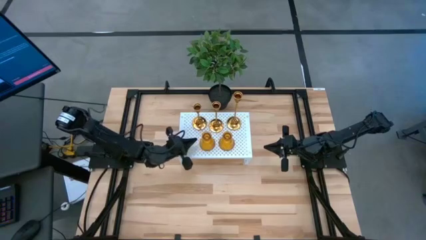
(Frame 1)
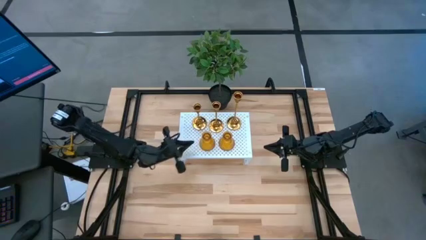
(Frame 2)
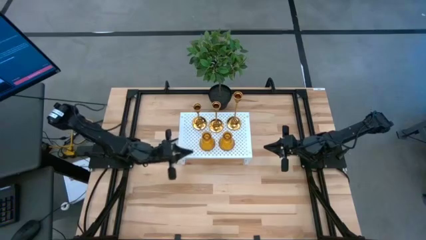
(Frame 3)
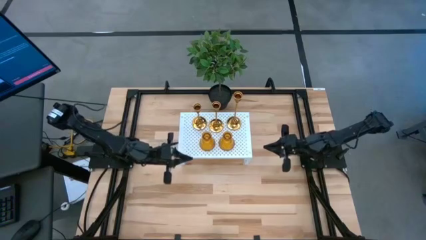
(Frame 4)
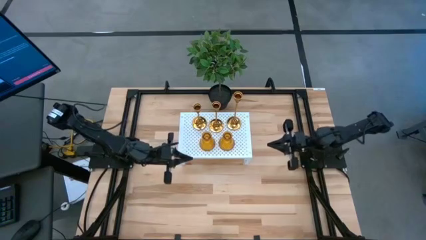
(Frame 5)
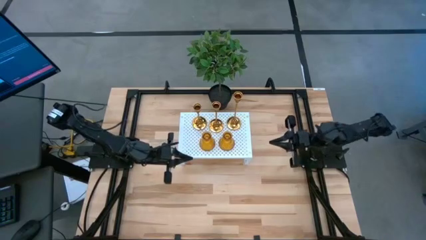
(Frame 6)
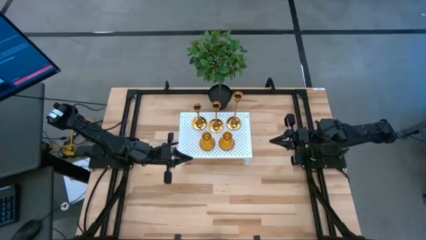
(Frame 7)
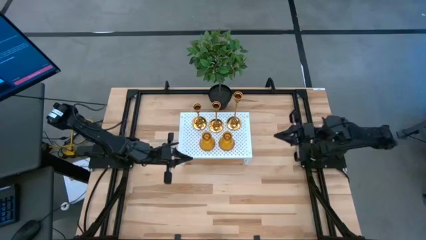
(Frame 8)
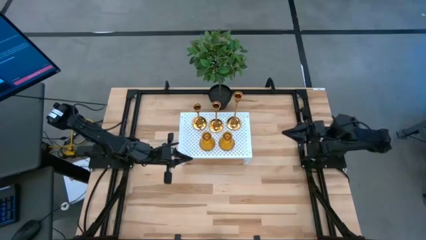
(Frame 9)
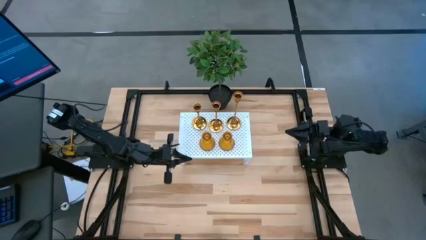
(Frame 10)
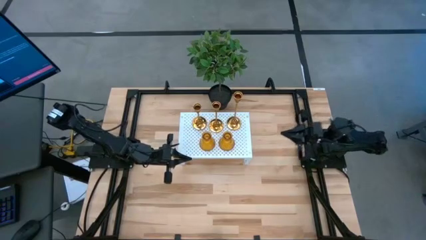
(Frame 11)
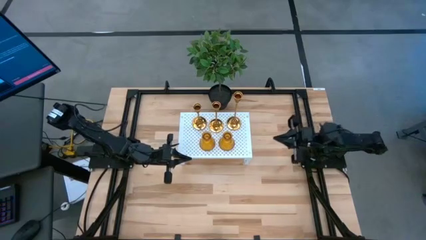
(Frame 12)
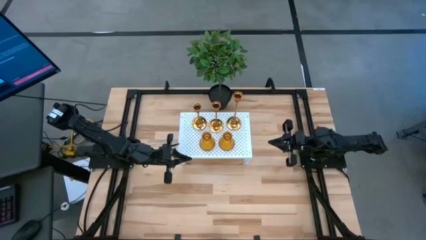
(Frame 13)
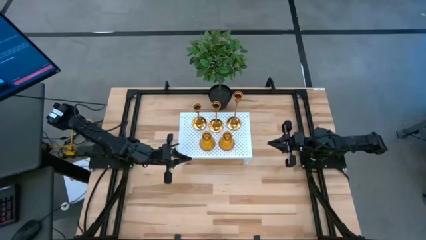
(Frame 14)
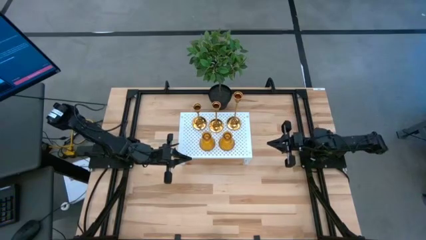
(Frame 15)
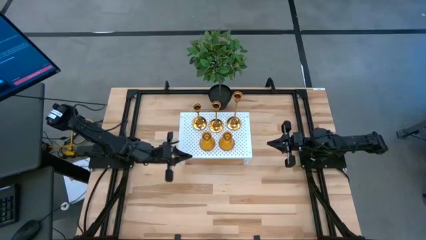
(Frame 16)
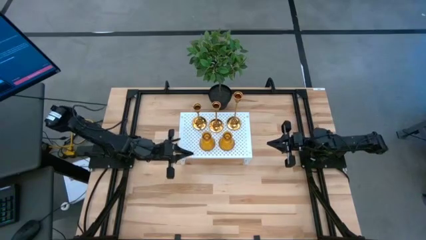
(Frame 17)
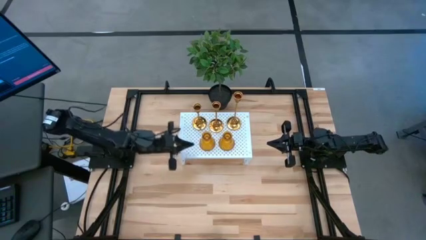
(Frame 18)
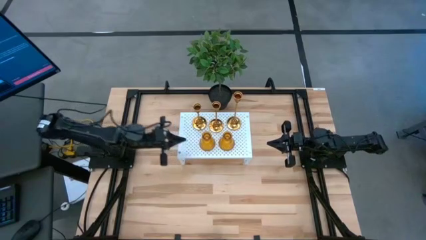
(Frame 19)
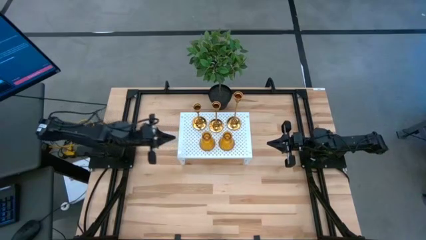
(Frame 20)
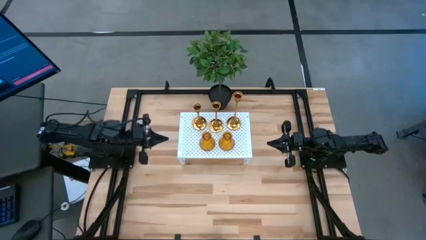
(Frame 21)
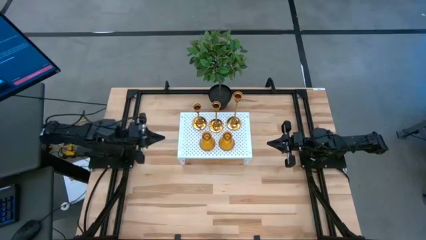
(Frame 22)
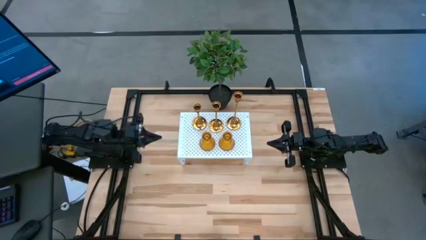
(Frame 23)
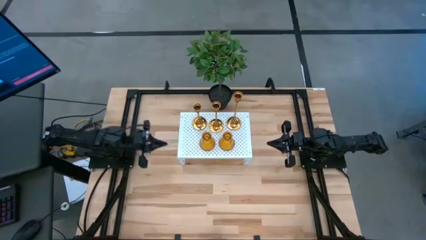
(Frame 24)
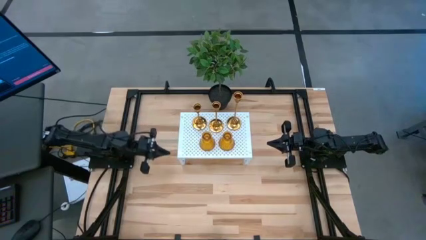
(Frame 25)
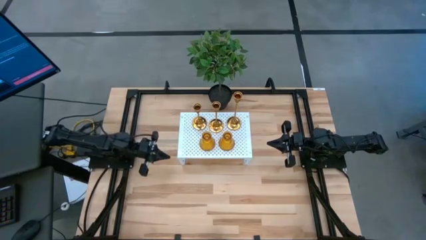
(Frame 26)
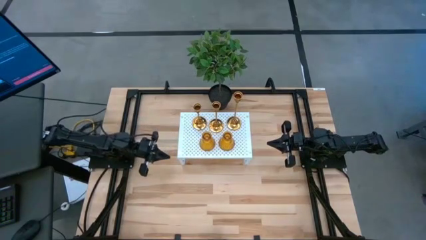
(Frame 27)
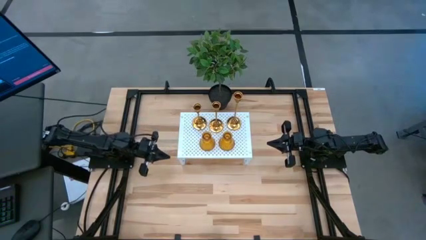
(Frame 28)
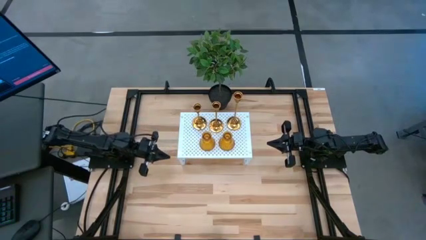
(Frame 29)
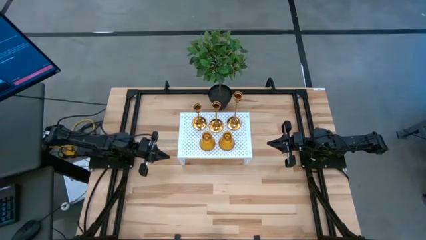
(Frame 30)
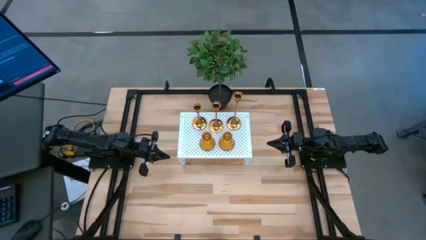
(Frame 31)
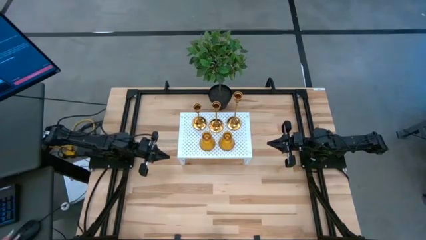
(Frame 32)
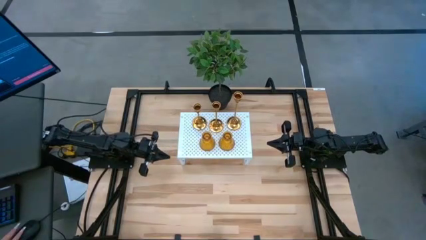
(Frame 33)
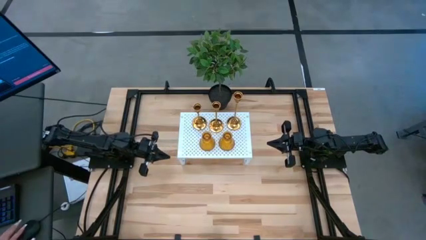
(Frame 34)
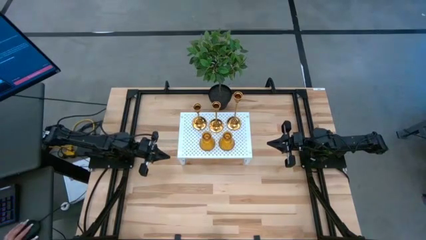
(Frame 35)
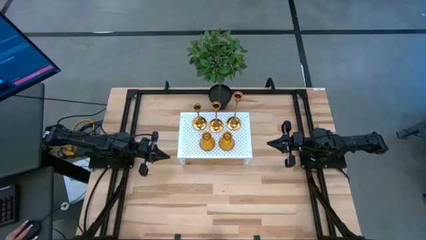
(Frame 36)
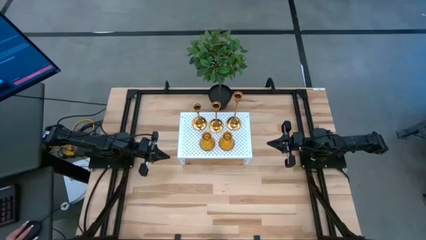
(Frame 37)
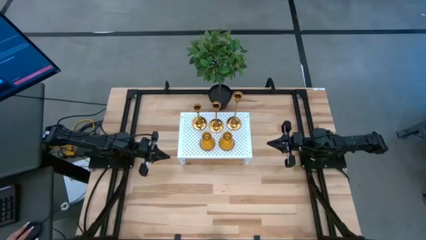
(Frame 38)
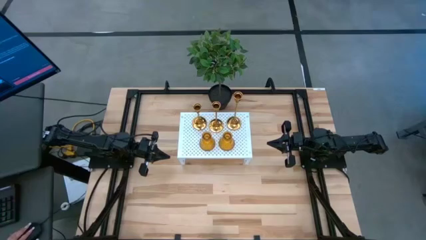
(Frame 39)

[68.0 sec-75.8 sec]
Task: Pick & Place candle stick holders
Return to Home Position

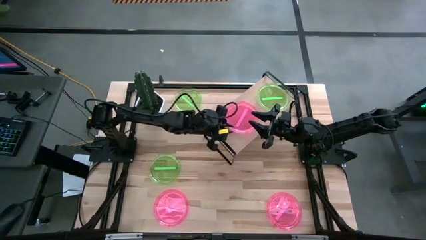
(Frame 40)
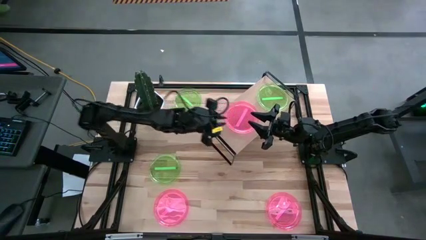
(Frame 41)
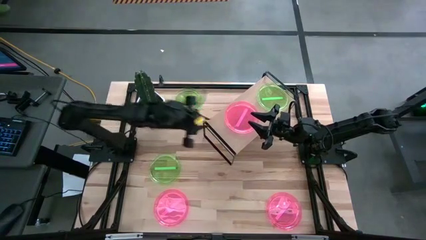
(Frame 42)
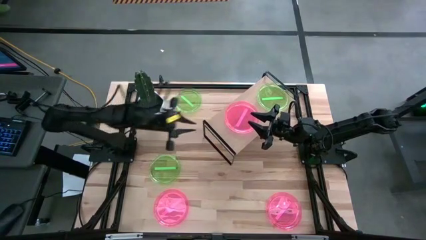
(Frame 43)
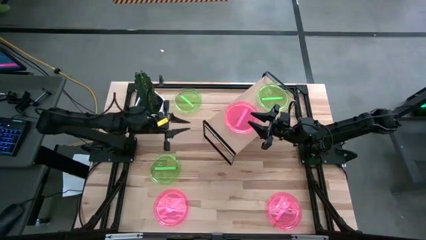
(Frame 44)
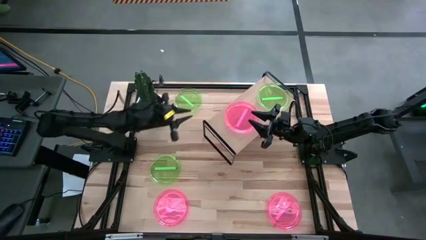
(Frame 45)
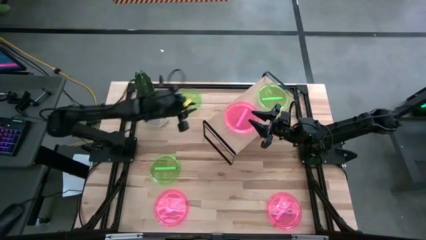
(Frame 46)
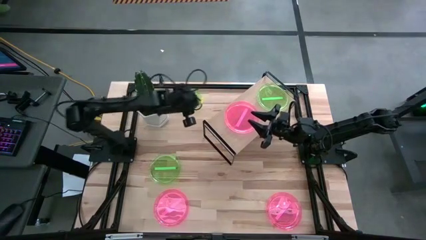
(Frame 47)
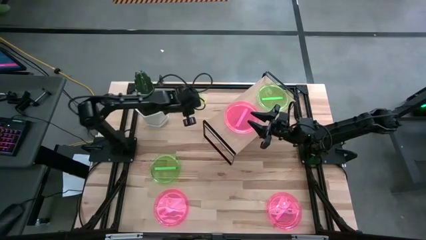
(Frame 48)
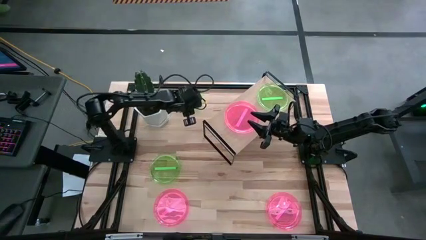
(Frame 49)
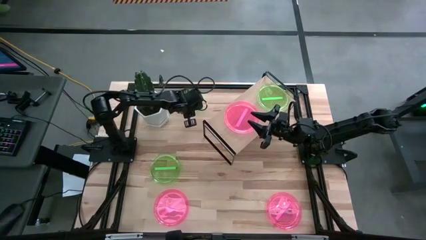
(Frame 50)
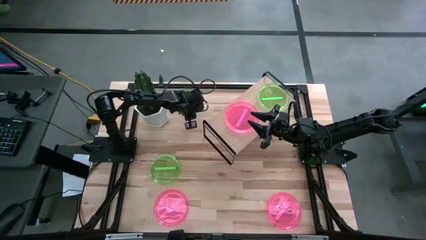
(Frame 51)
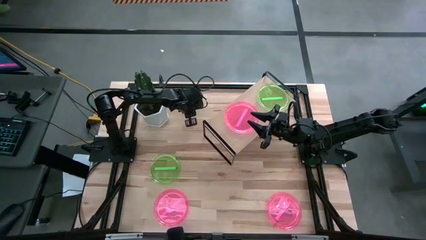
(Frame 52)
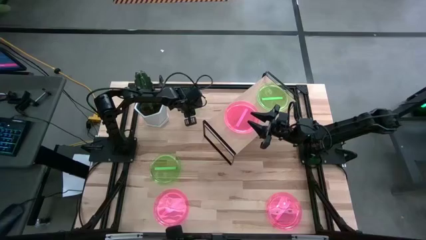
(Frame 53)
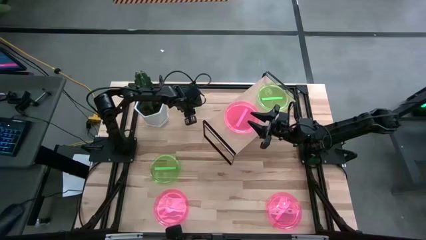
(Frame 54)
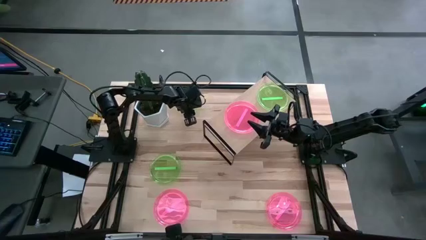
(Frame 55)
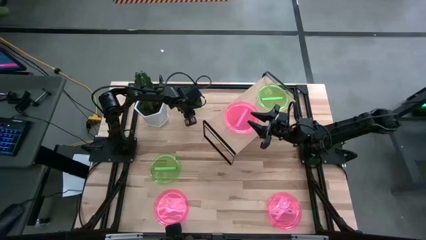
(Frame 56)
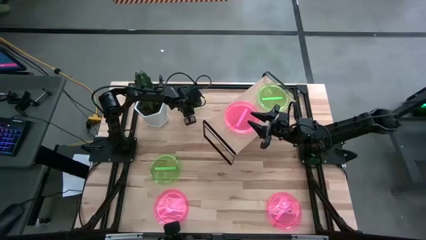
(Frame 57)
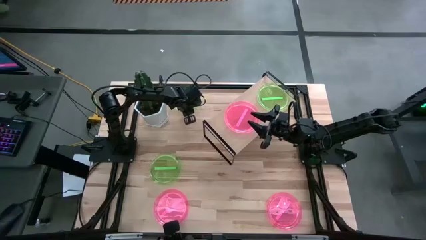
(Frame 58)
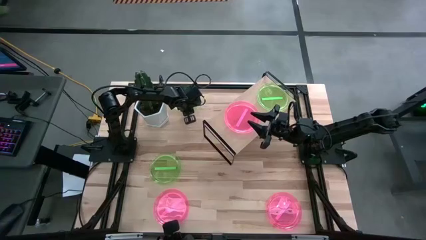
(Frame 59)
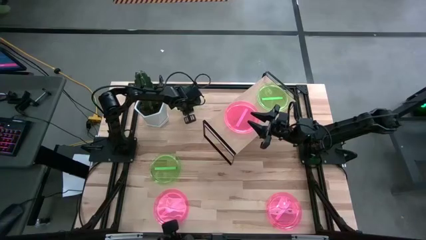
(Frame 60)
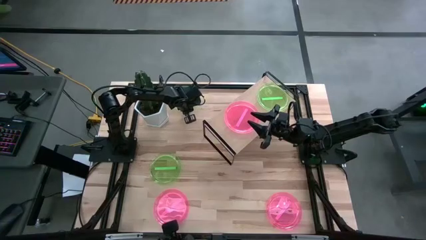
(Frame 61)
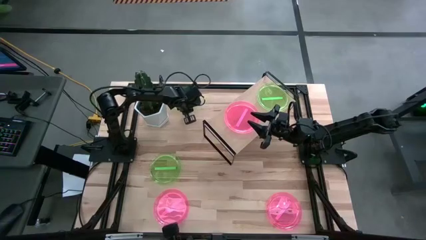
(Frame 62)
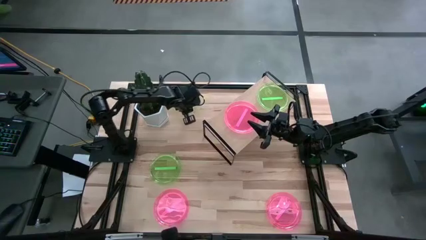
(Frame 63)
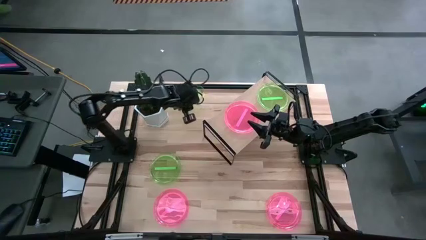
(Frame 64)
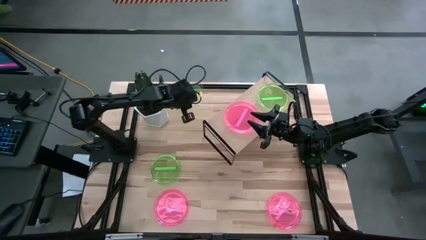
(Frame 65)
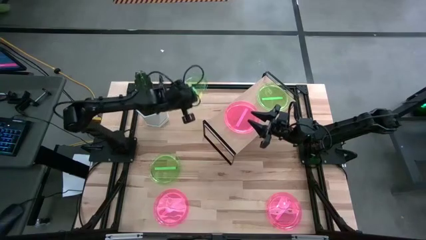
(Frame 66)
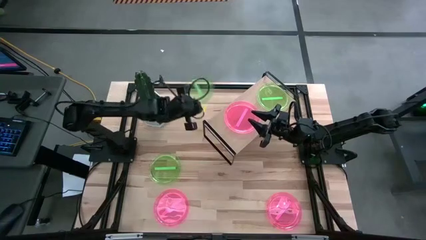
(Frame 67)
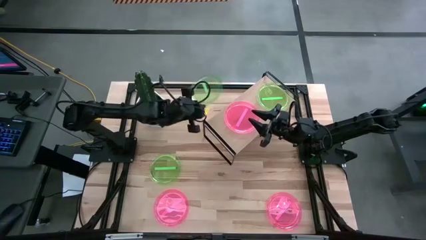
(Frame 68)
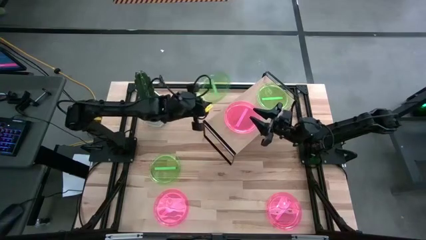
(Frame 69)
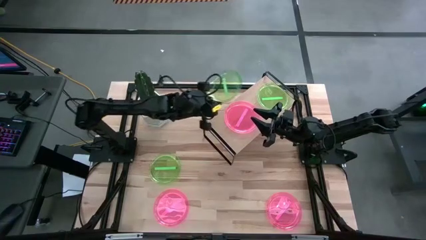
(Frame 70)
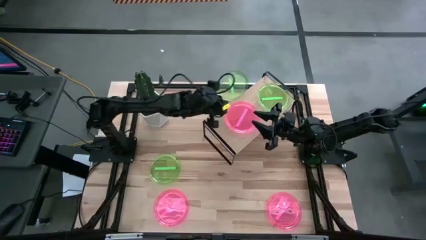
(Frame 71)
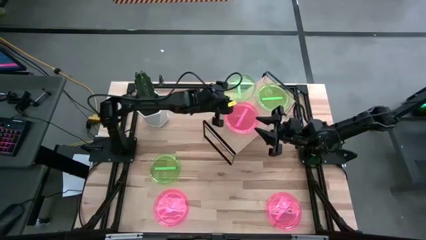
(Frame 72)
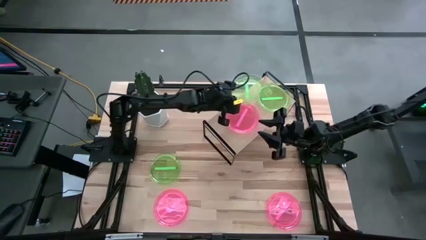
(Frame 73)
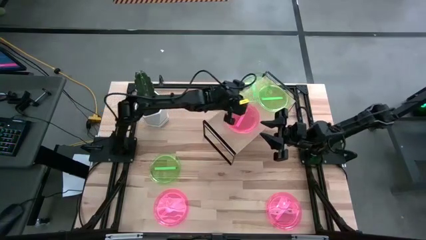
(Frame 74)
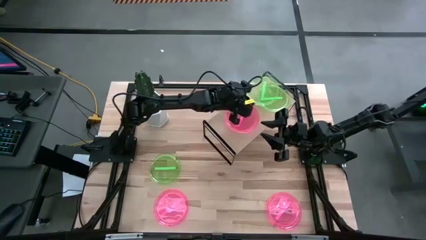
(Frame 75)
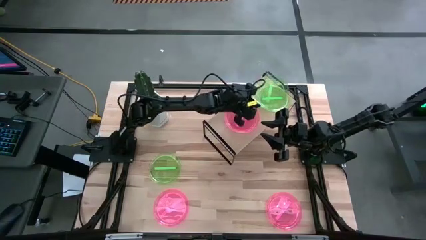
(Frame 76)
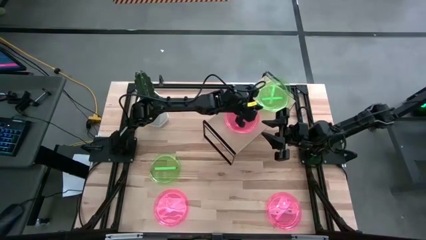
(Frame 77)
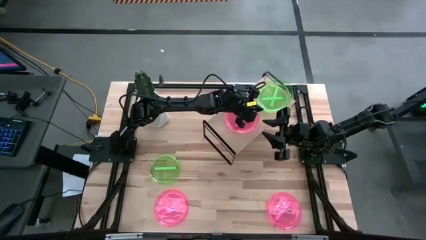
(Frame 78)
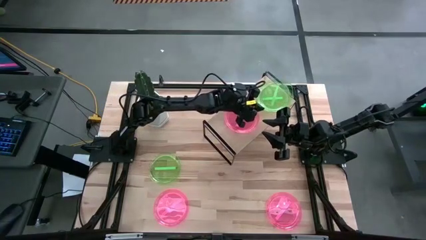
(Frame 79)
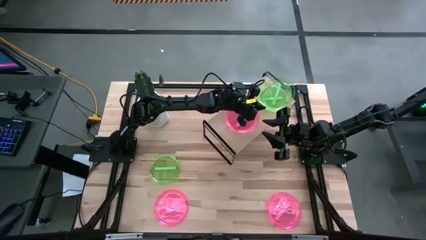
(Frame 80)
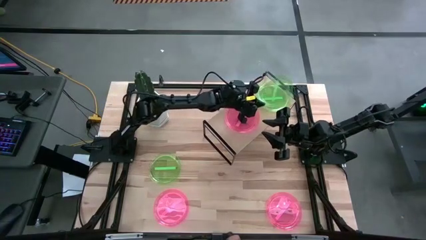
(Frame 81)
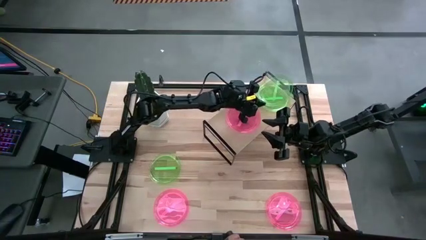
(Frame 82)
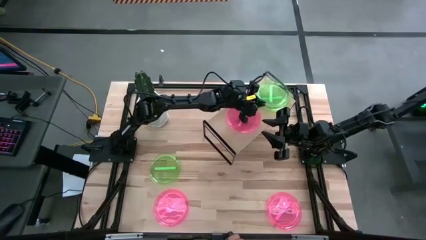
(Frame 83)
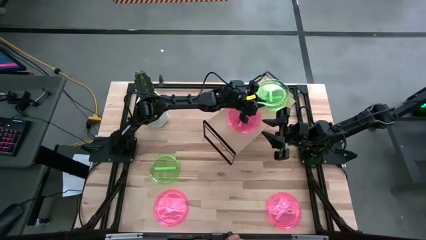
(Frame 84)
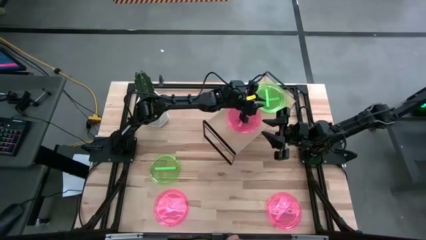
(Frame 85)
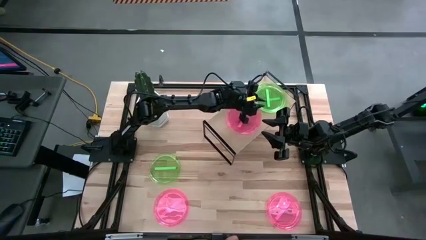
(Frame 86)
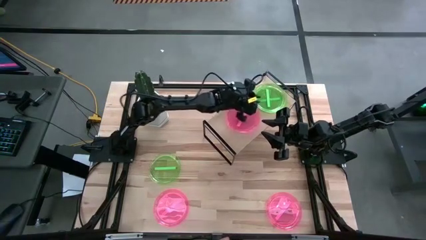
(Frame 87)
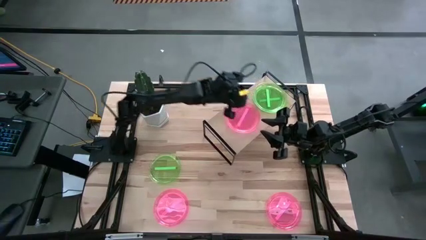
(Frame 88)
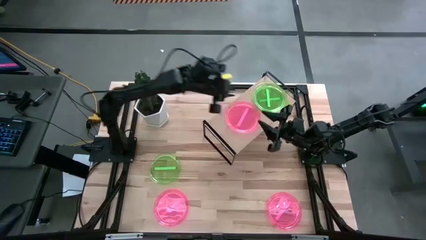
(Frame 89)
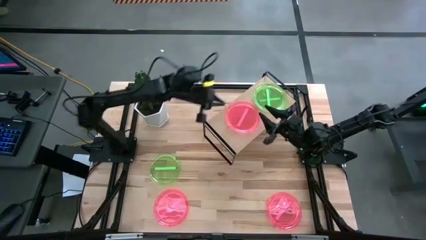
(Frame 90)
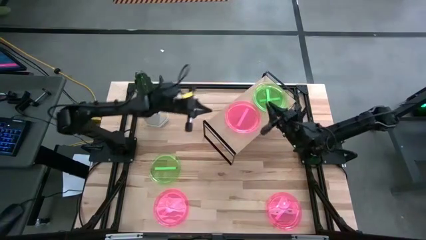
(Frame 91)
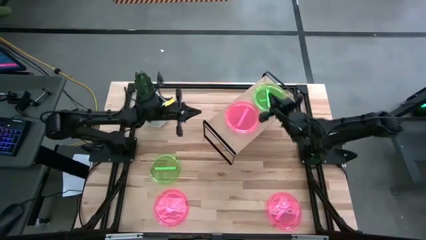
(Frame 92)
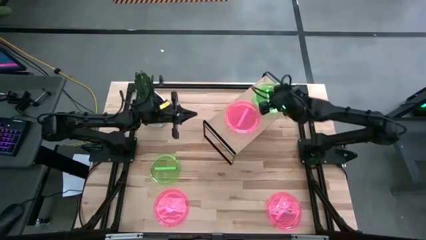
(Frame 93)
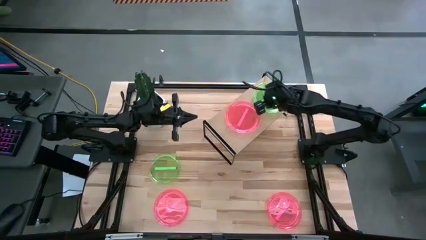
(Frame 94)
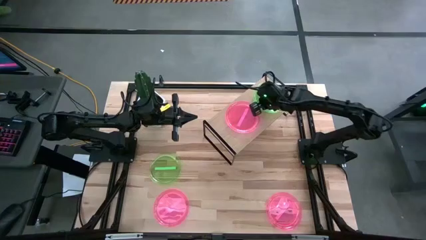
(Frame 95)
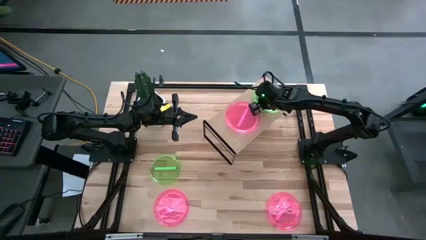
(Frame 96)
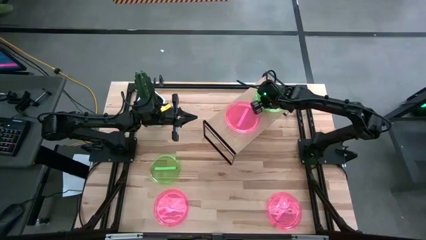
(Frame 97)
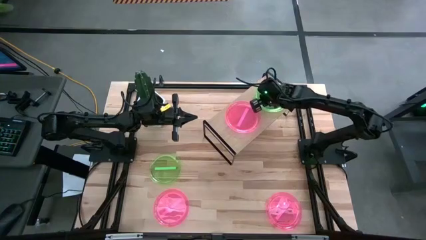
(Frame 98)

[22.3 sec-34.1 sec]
Task: Place and stack plates onto a shelf
Stack the top green plate on top of the green plate on the shelf
